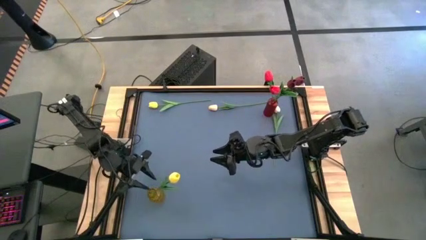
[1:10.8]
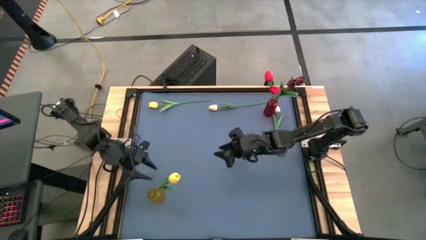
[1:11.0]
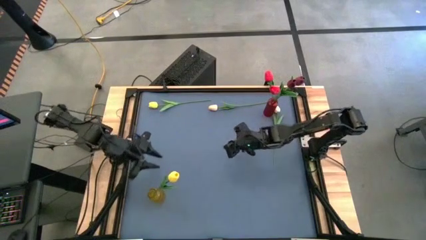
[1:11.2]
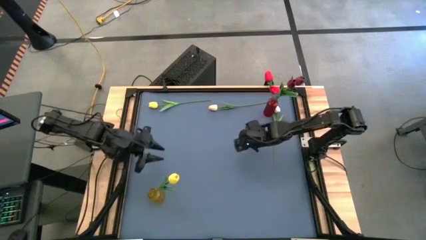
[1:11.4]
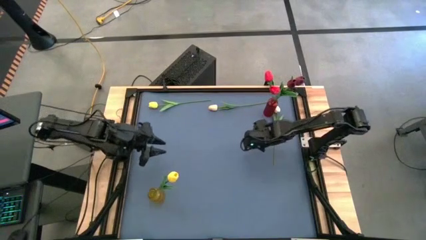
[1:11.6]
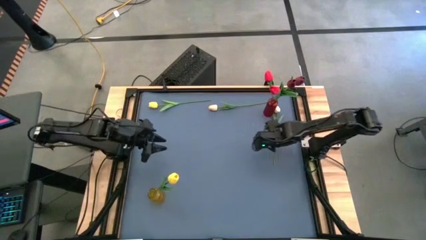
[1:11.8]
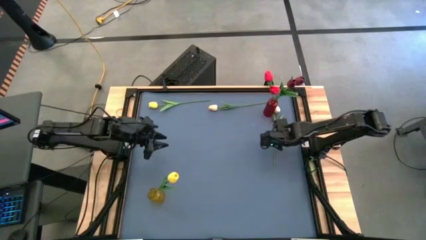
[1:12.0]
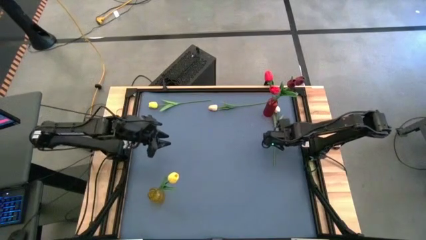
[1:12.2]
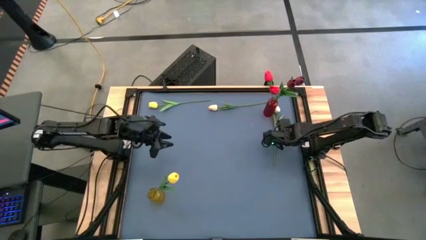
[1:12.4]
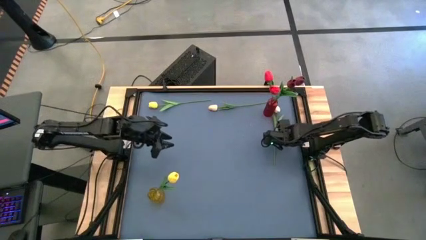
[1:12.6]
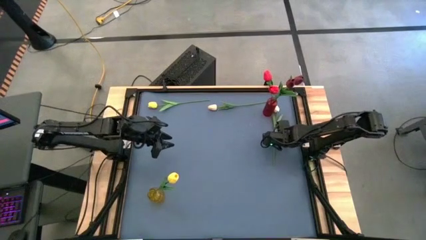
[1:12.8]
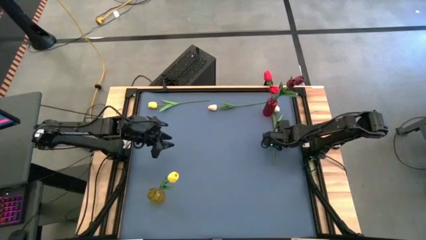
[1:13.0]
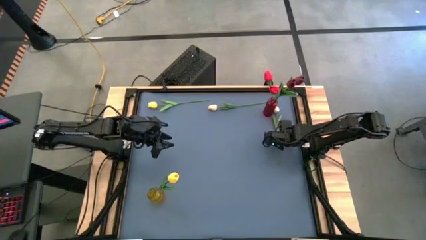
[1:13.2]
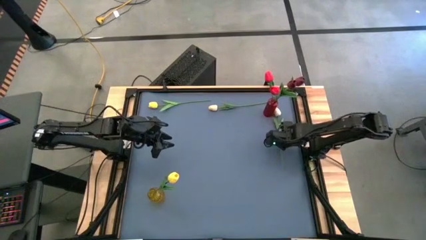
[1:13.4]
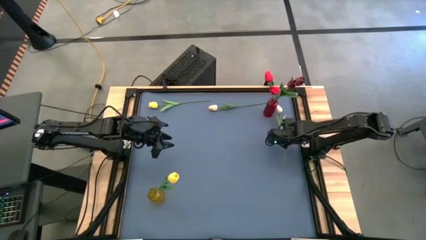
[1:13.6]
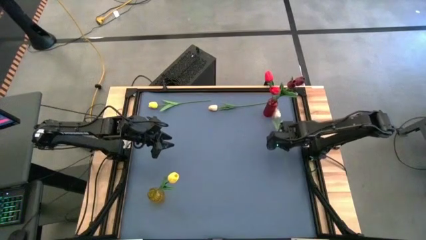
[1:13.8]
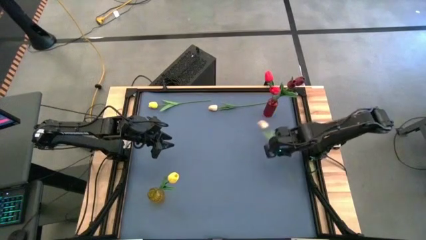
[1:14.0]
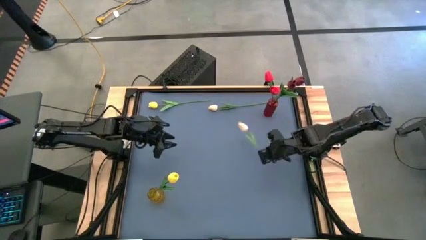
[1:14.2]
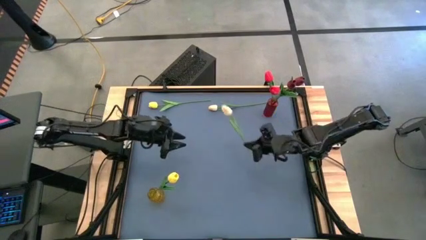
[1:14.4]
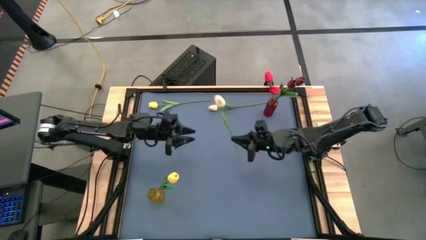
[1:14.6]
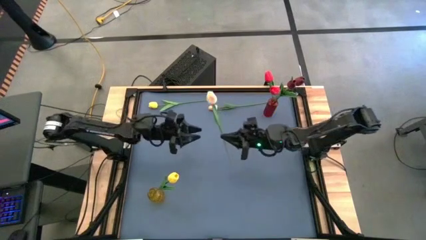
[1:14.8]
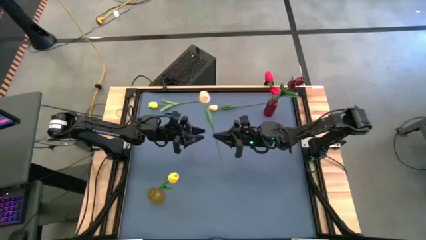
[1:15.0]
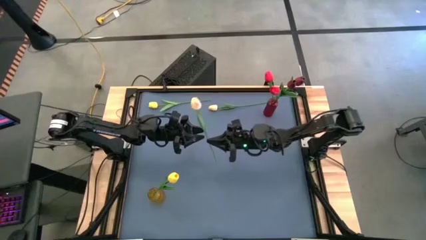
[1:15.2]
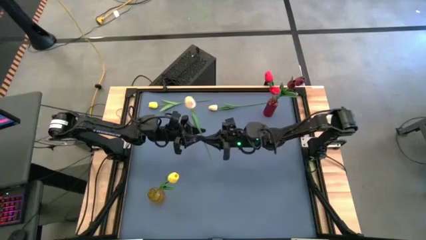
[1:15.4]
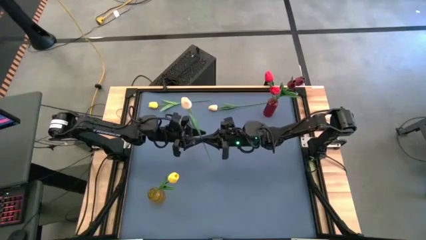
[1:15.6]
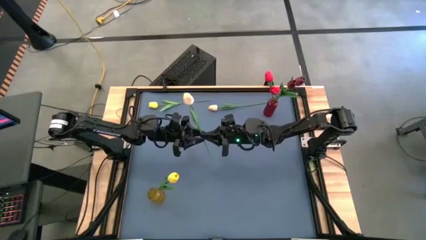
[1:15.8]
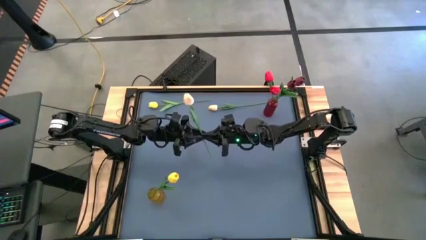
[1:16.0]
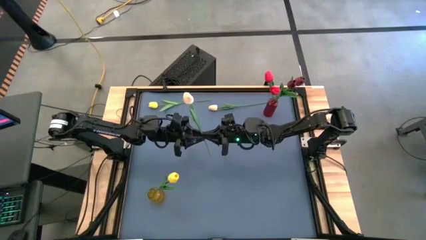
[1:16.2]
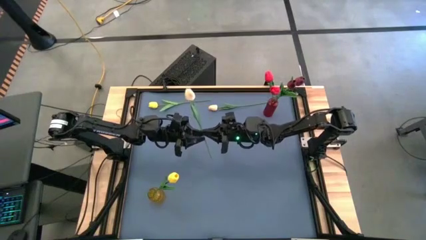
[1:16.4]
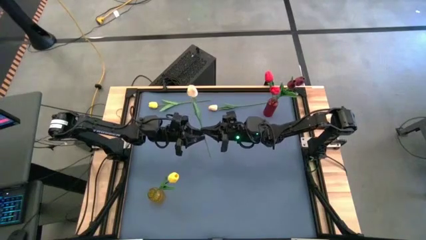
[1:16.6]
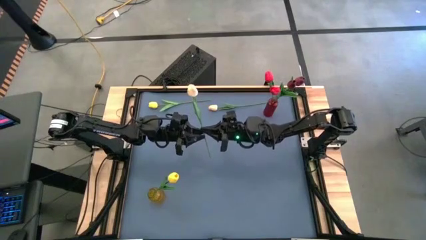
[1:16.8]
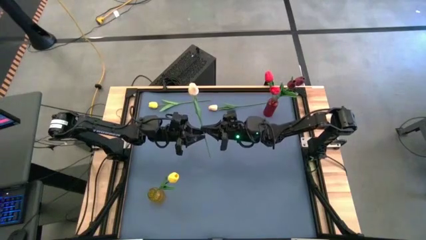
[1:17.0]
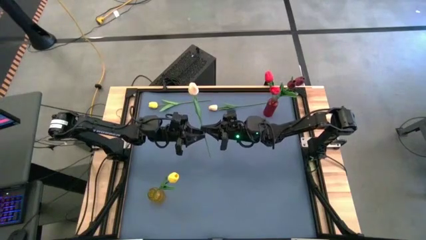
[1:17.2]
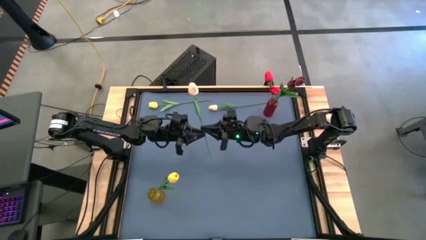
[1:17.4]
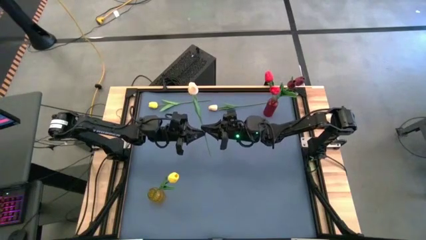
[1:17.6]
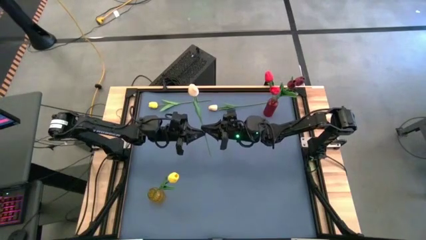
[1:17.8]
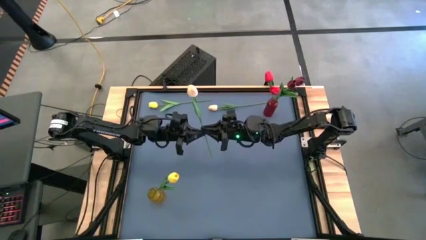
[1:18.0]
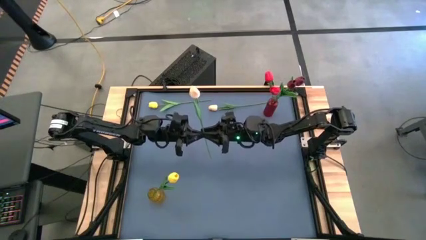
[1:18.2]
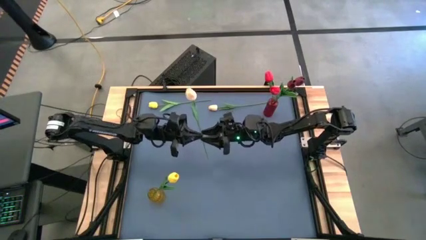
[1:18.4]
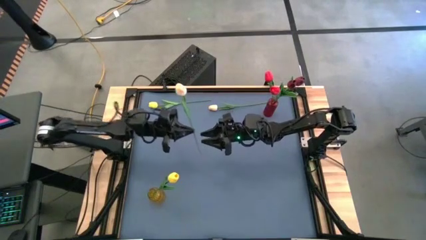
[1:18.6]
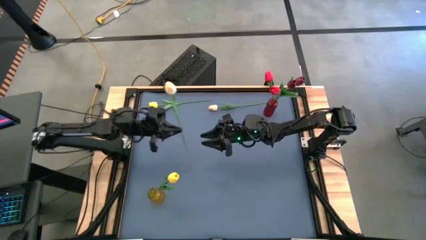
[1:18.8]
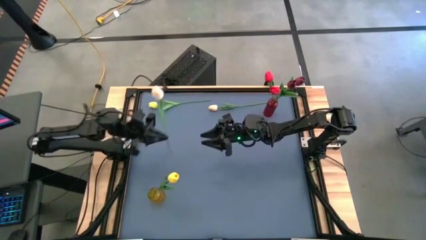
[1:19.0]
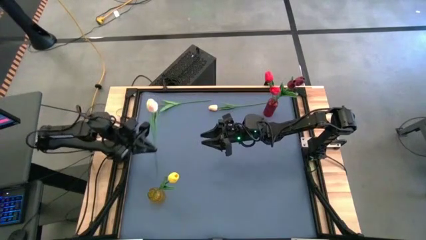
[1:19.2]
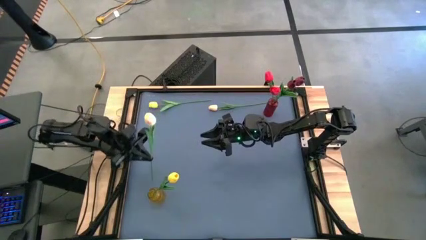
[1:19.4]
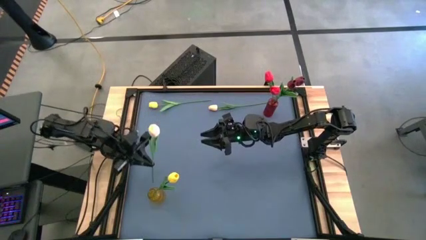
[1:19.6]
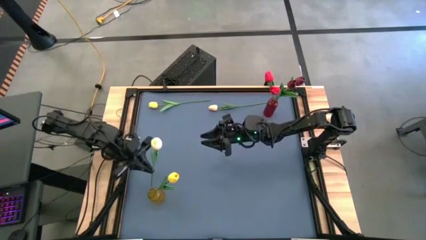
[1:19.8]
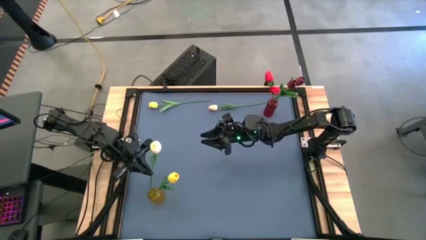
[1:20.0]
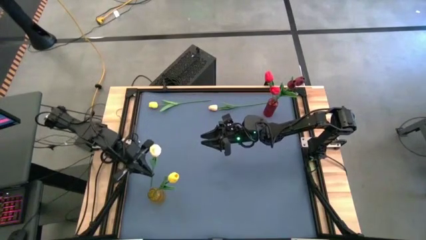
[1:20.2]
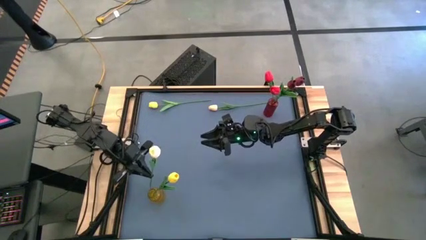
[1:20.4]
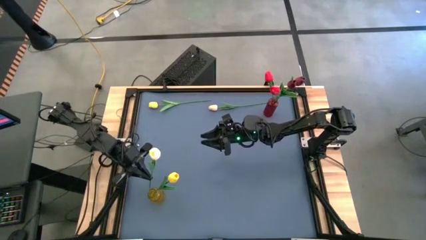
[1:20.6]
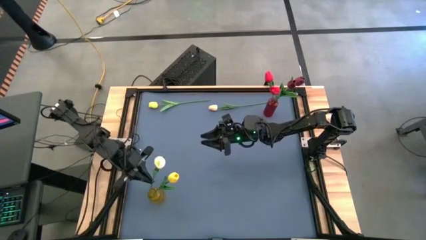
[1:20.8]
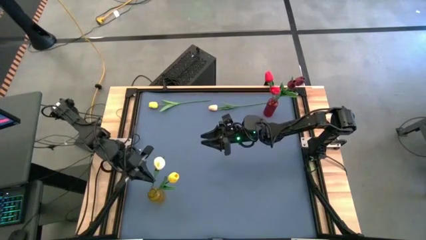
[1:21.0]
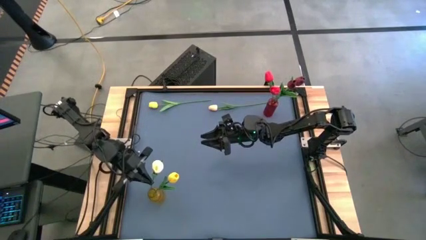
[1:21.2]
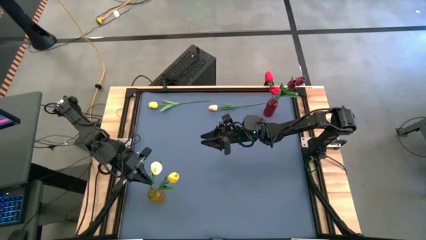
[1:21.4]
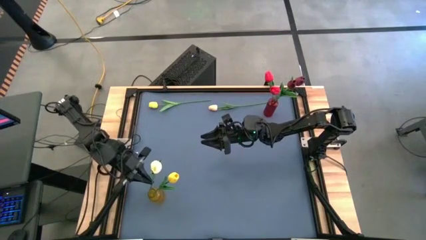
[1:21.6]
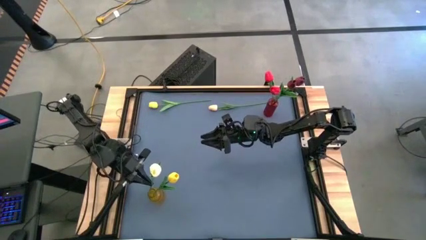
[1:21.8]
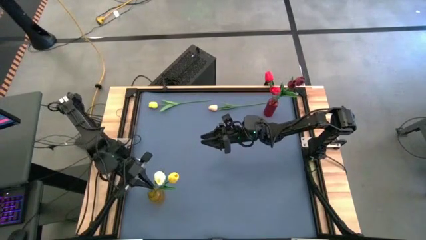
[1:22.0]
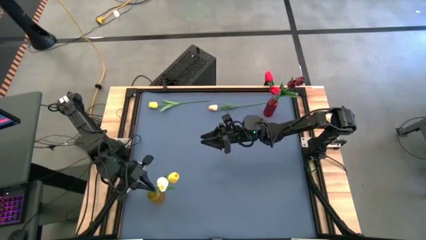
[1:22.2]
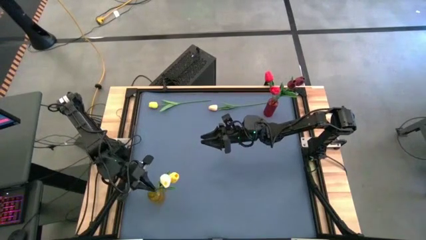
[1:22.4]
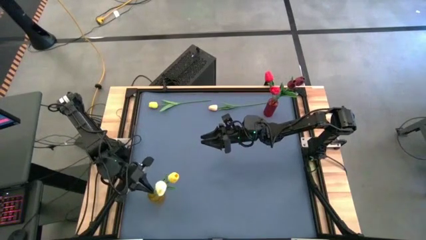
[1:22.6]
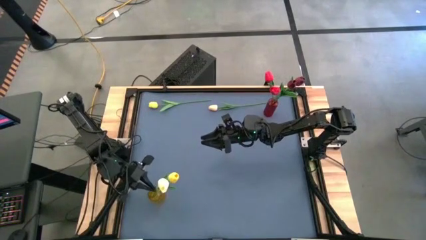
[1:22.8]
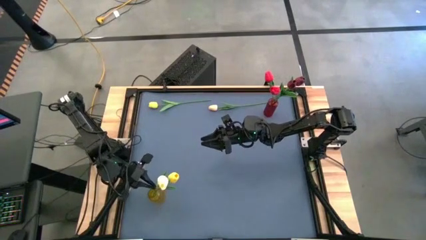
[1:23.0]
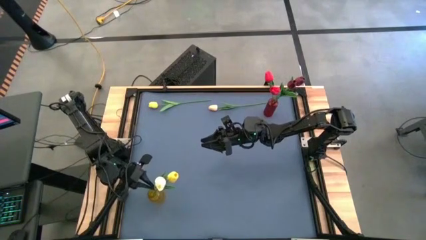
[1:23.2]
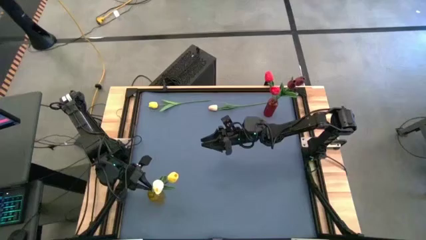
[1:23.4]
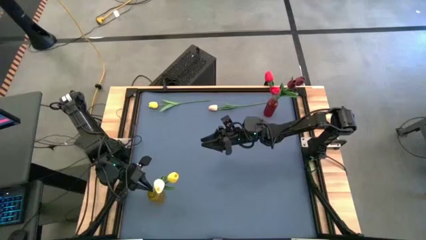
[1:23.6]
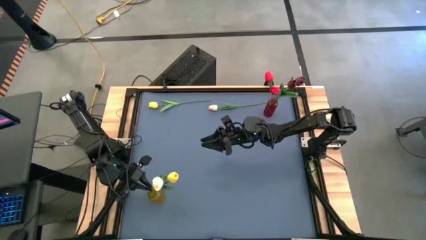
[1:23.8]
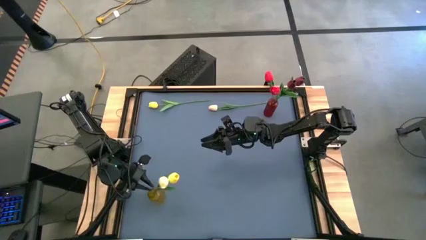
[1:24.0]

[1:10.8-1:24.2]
Task: Sort flowers into vase by color
Put the bottom white flower into the yellow vase
